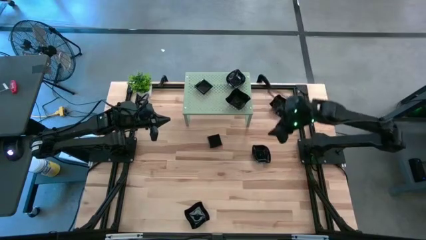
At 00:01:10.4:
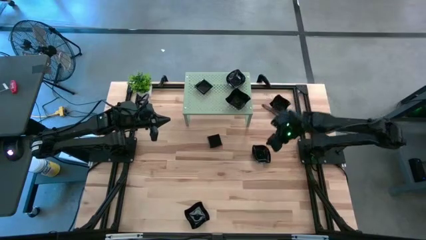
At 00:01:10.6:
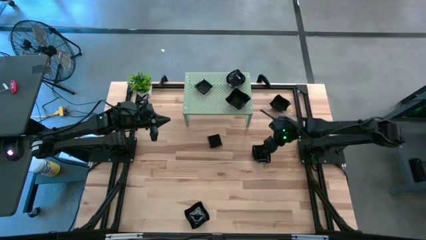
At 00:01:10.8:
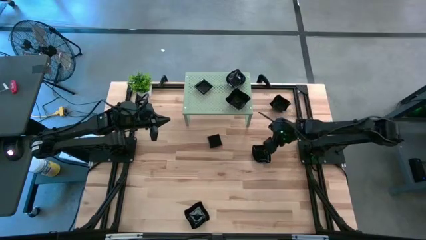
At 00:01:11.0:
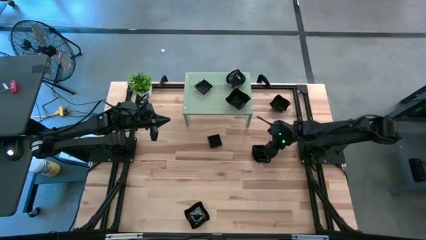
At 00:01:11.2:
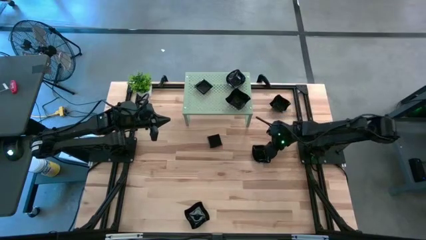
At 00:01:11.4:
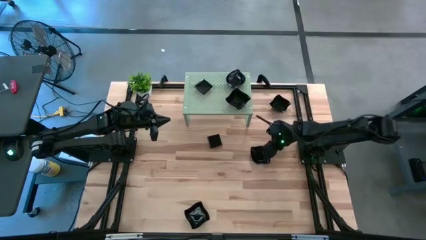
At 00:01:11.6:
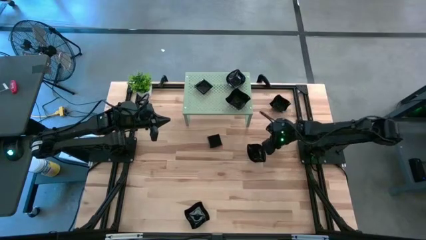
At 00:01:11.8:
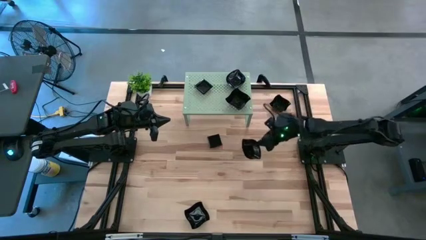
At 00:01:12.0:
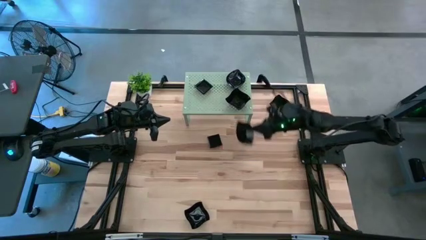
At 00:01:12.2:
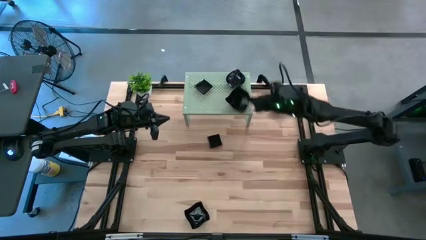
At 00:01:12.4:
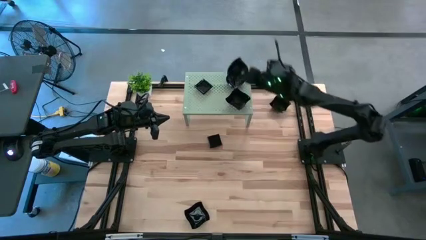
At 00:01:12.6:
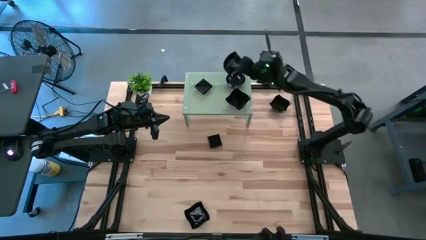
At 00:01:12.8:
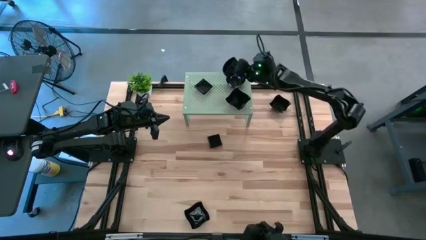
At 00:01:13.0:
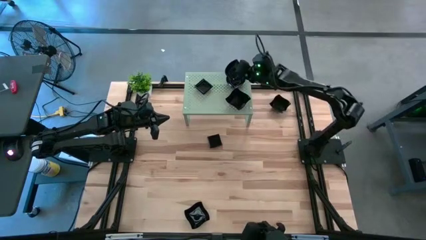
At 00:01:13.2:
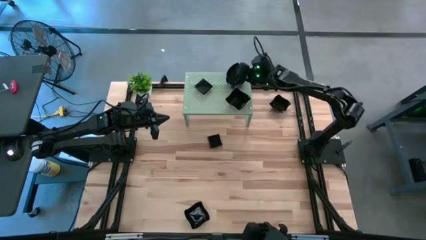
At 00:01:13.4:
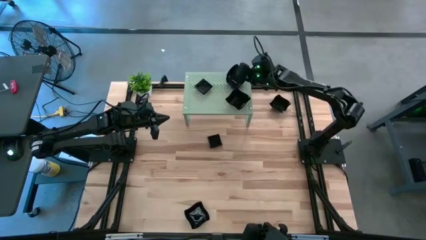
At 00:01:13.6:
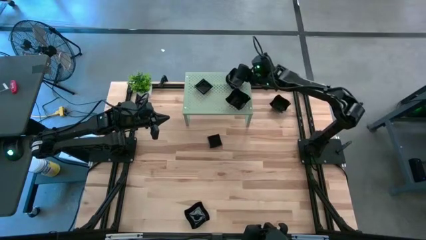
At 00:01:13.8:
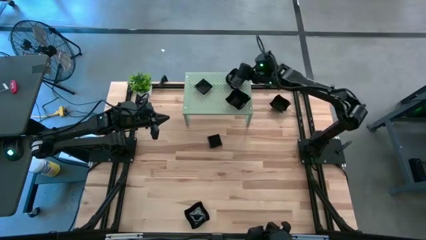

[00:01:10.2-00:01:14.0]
Task: Pick & Place Mini shaped plates
Stack the black leaf-shaped plate on top of the black leaf-shaped plates on the shelf

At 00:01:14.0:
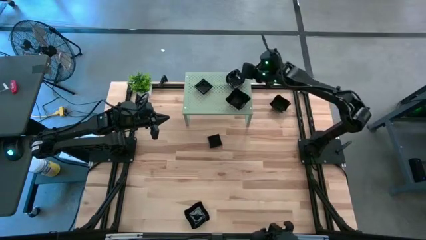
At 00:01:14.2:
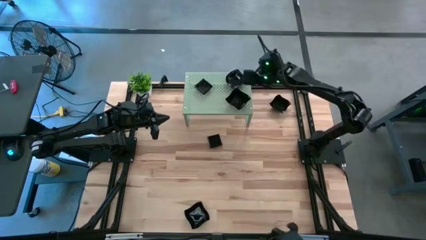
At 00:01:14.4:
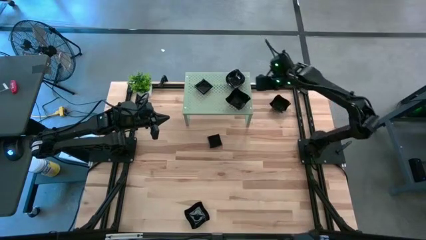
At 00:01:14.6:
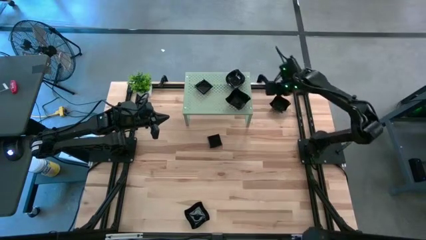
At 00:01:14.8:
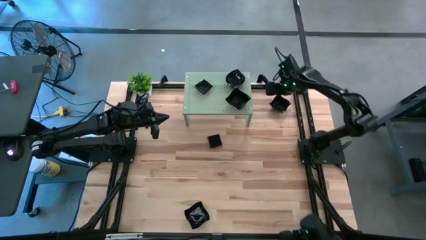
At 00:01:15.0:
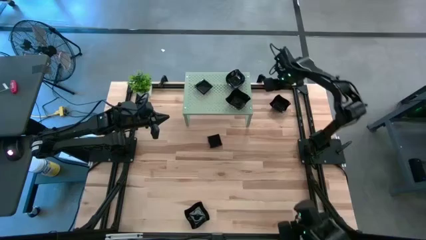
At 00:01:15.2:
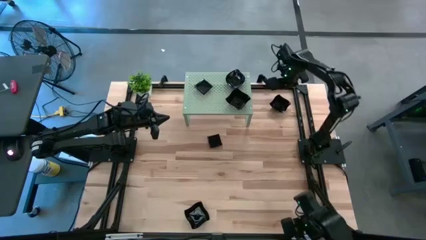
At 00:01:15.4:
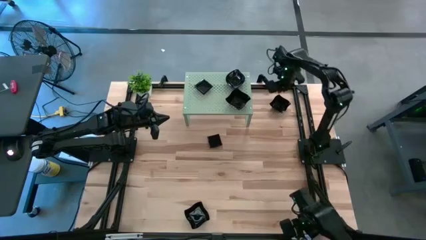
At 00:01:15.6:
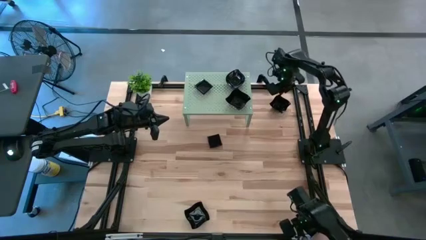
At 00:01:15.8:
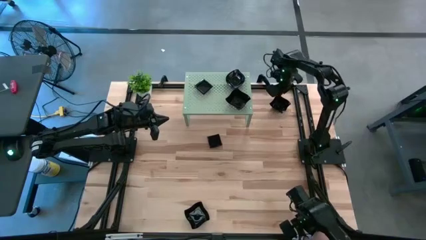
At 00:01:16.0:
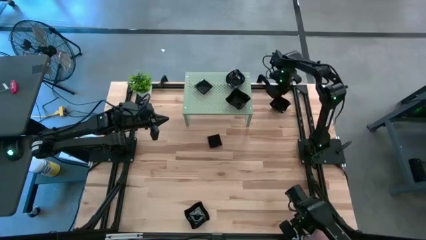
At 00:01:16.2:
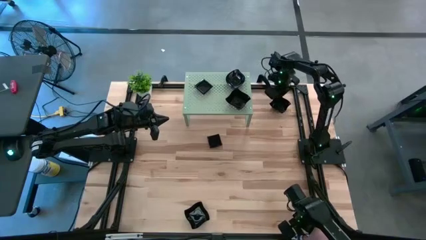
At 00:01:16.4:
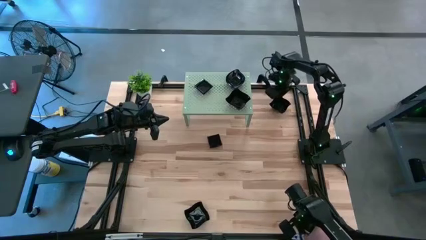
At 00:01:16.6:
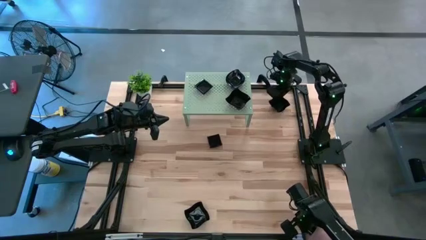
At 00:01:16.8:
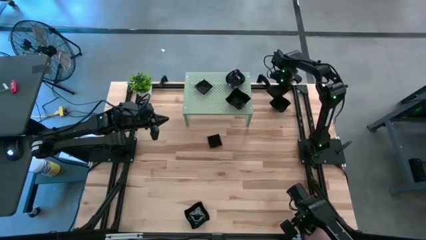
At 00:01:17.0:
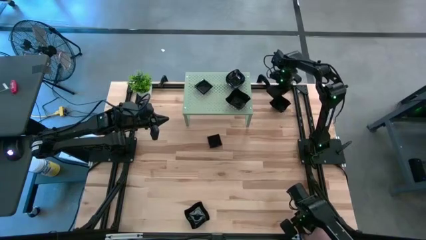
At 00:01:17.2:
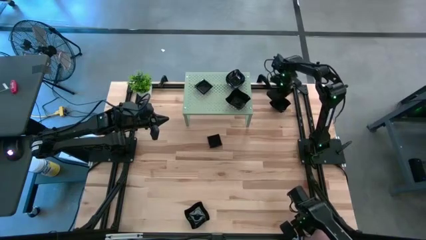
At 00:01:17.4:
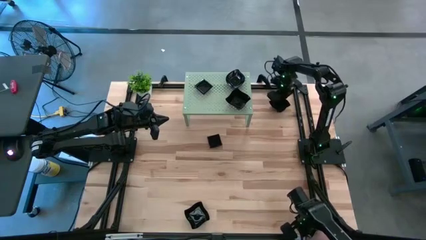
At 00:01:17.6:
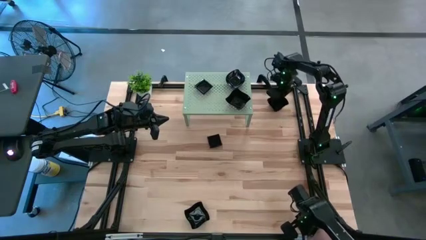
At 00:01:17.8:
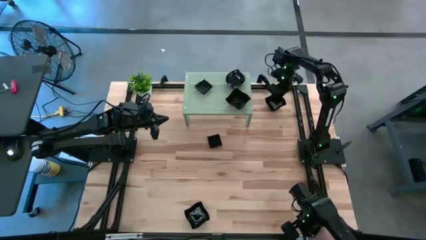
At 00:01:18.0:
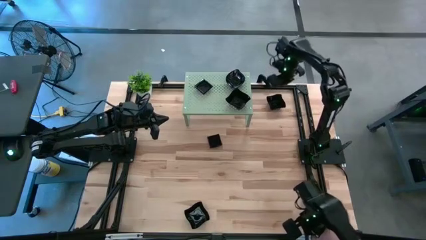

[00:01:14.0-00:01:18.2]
Stack the black distorted square plate on top of the black distorted square plates on the shelf

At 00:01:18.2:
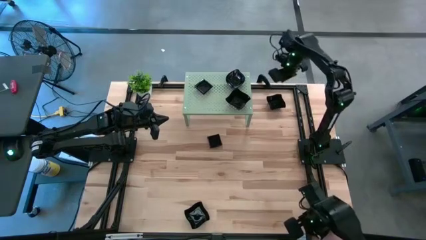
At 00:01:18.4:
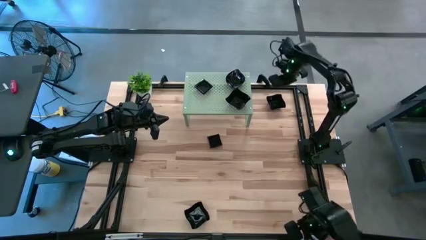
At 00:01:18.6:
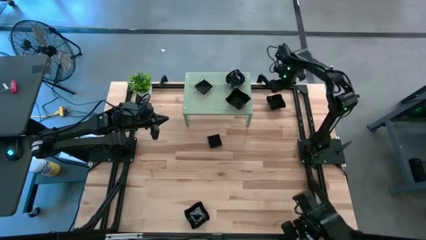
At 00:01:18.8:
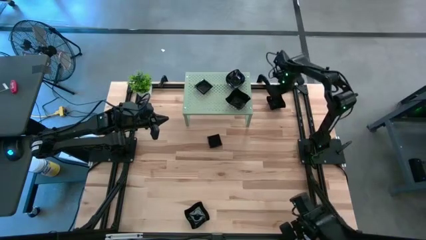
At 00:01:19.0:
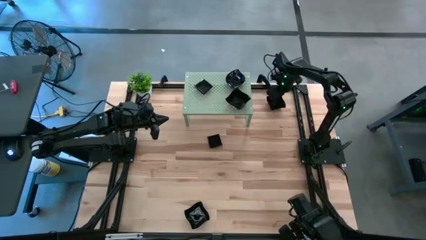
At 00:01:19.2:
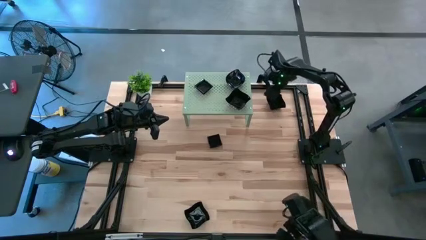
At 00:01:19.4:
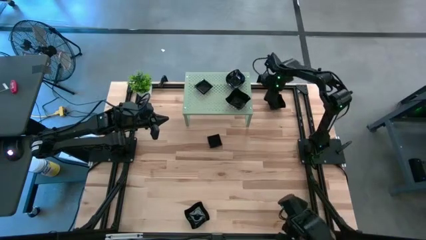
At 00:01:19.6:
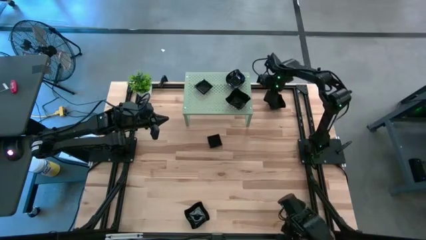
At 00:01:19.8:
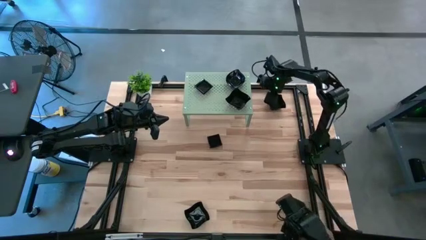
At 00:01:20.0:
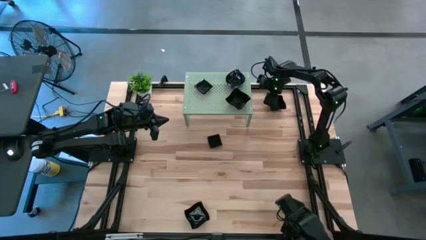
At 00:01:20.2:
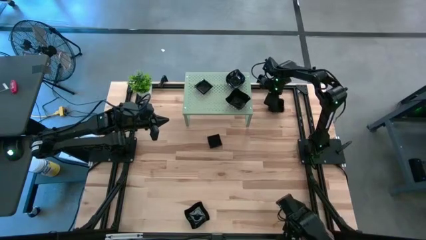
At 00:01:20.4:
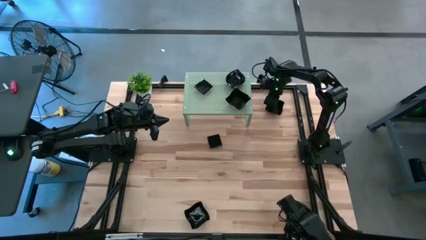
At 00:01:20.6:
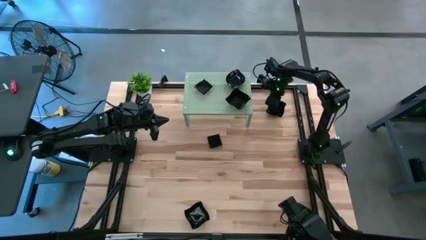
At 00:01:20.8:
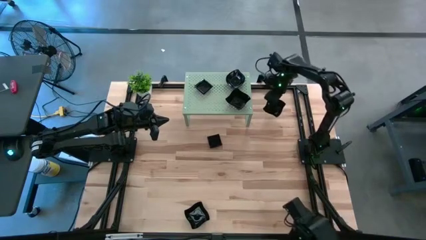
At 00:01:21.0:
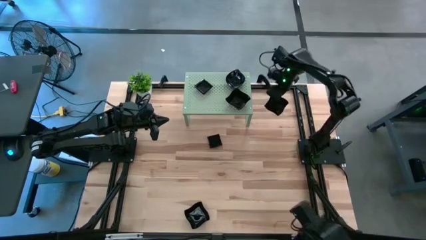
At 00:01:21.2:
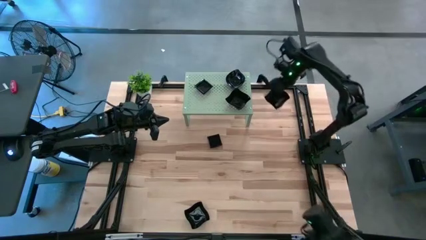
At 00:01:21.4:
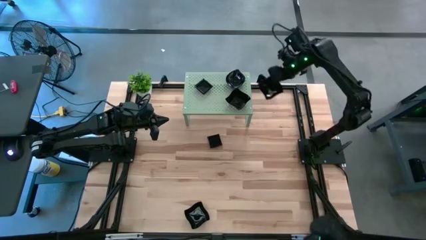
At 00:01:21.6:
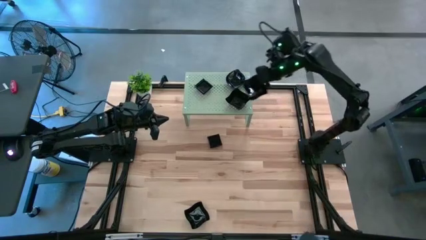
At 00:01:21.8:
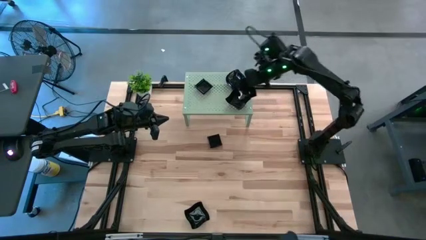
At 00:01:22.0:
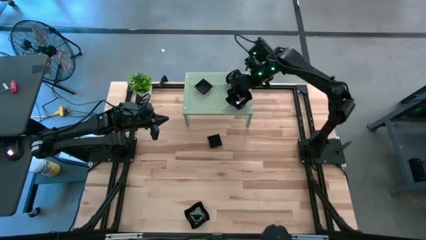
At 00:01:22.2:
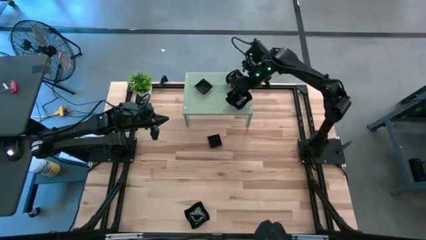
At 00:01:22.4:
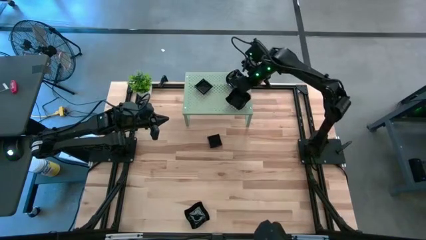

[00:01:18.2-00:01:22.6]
Stack the black distorted square plate on top of the black distorted square plates on the shelf

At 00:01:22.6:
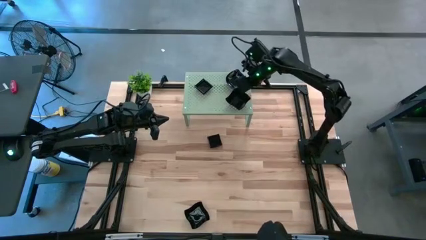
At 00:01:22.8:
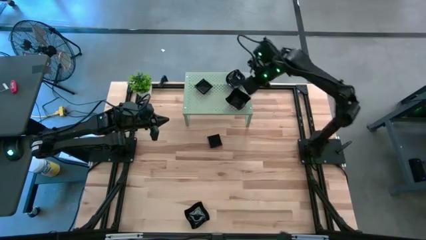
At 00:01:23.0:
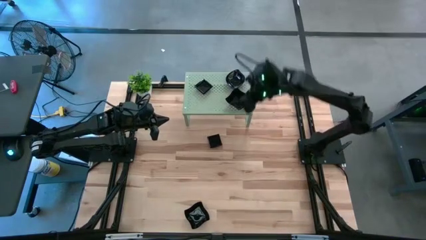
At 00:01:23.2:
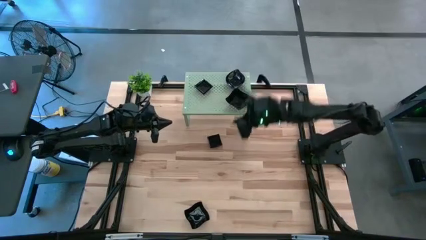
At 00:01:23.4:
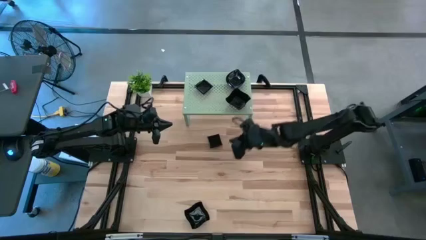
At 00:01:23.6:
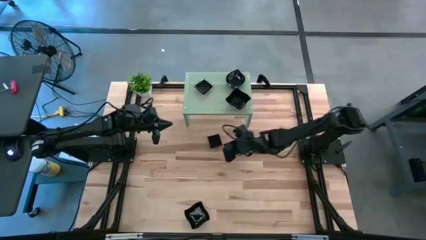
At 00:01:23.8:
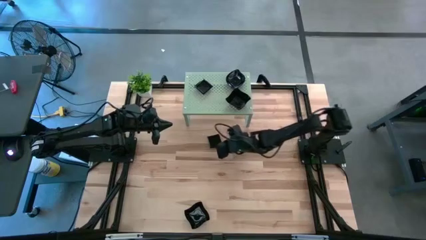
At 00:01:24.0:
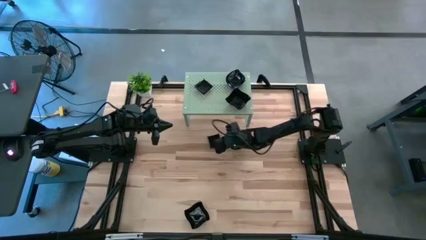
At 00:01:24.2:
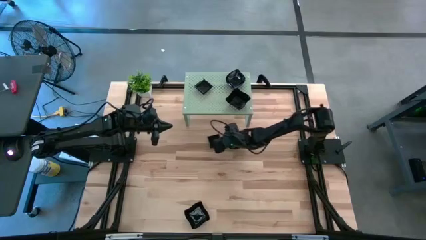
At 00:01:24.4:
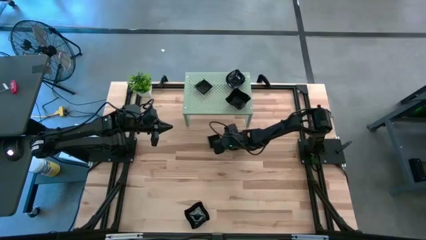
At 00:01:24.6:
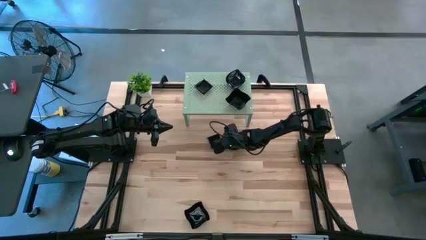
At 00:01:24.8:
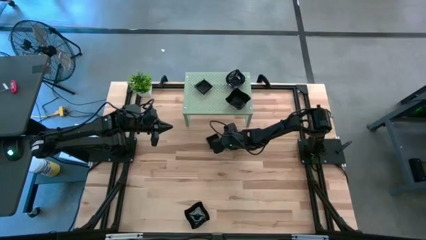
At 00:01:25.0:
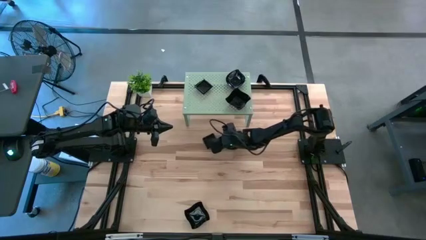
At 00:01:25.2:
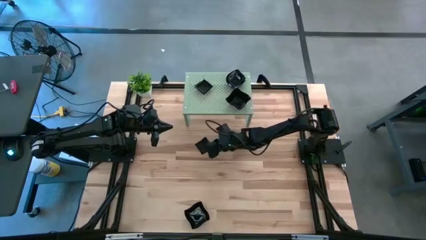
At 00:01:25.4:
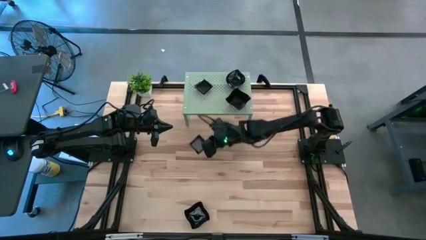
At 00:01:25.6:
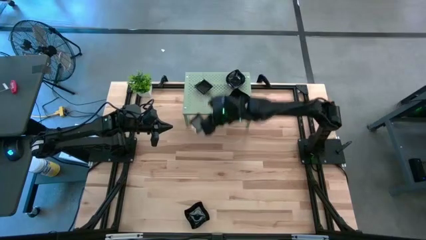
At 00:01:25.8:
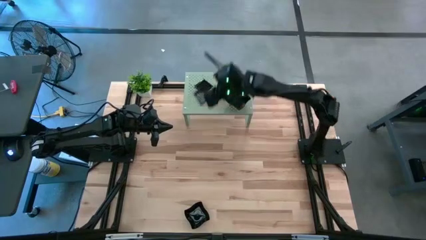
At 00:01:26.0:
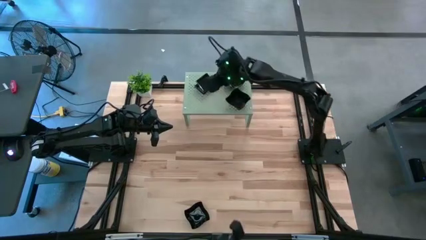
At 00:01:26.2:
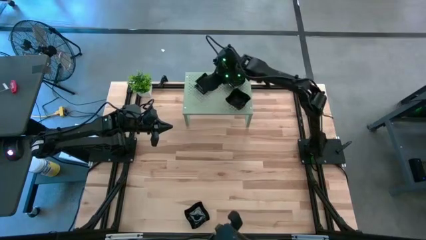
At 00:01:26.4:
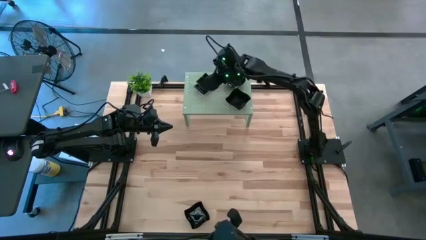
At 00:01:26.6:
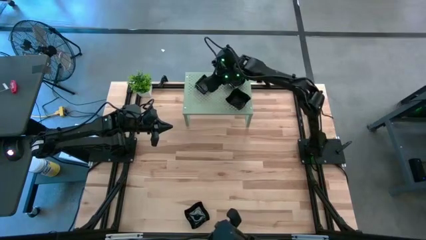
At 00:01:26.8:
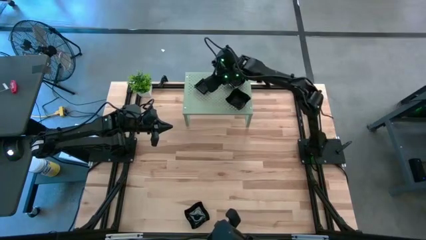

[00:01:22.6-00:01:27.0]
Stack the black square plate on top of the black square plates on the shelf
